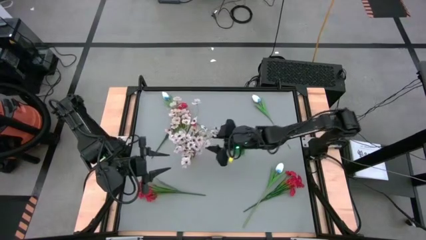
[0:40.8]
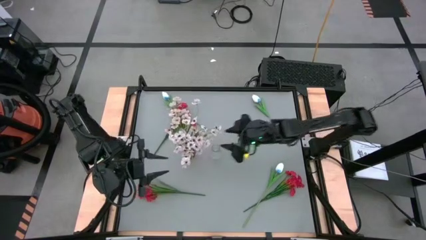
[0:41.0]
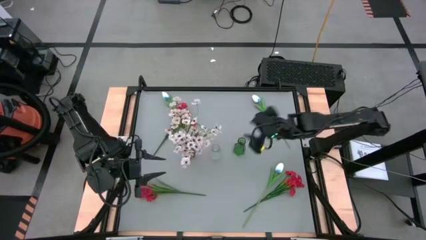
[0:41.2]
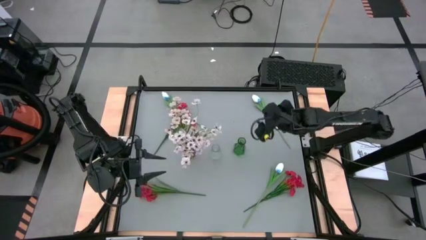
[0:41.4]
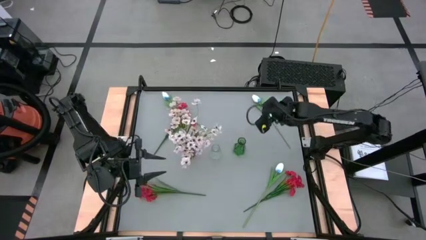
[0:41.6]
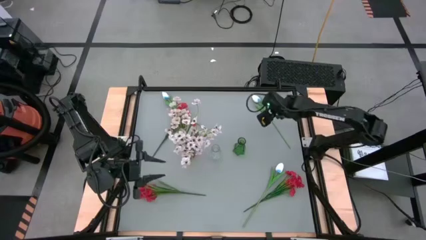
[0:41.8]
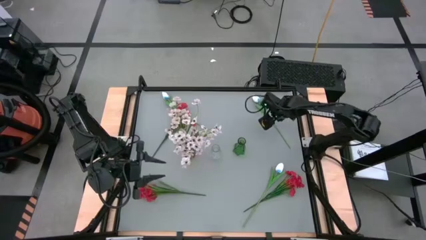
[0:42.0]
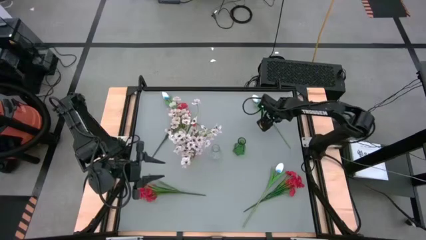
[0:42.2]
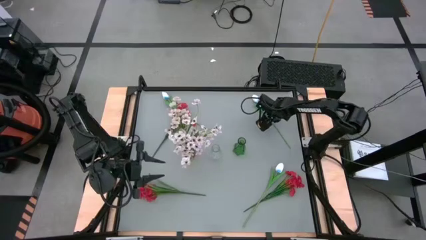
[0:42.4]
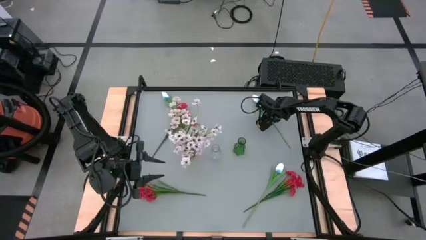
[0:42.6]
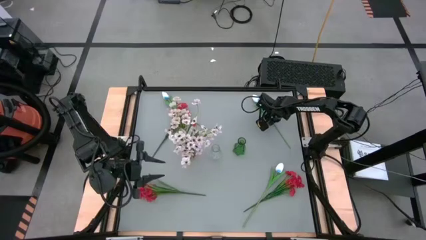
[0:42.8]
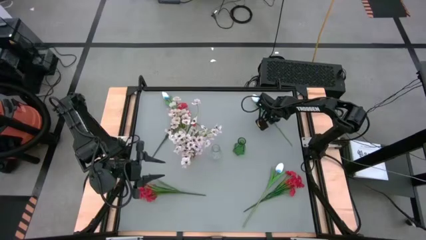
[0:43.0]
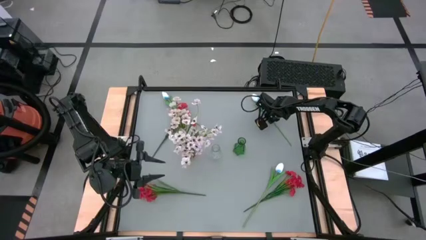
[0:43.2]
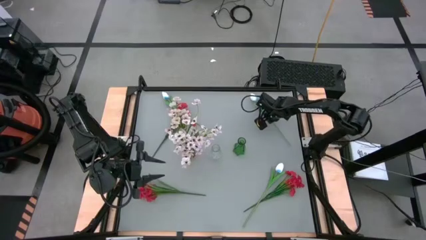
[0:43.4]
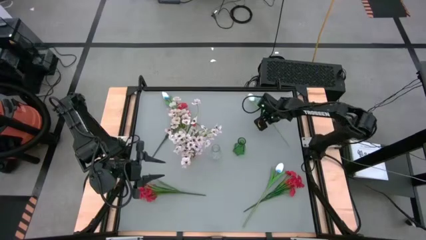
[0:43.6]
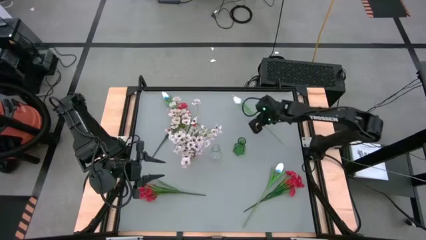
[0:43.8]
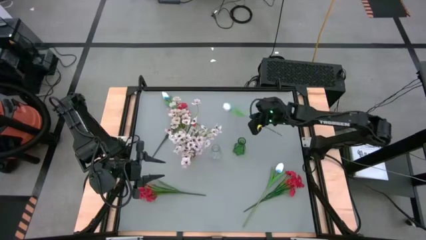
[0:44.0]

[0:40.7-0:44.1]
Task: Sort flowers into vase by color
Put the top right white tulip into the transparent flower vase

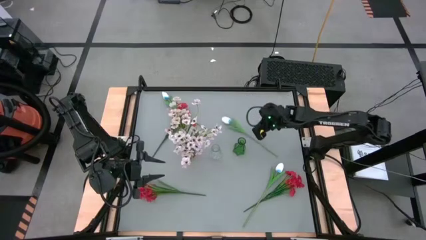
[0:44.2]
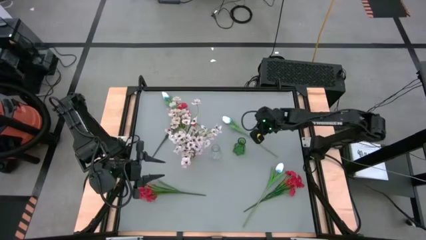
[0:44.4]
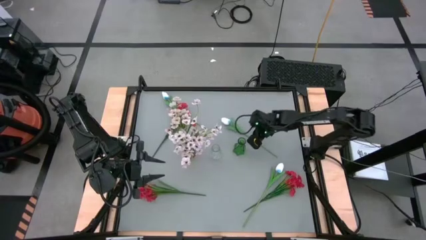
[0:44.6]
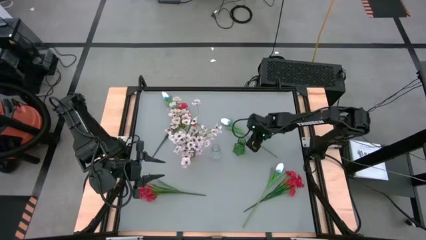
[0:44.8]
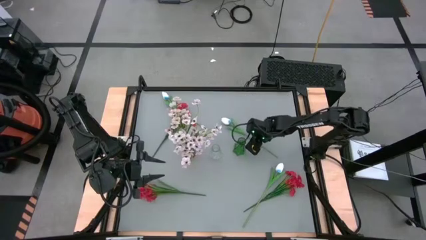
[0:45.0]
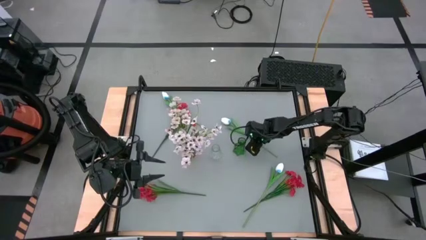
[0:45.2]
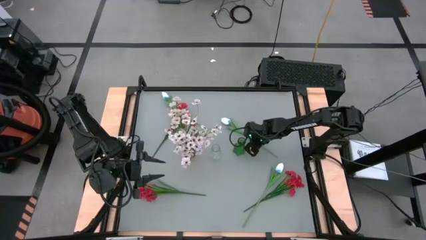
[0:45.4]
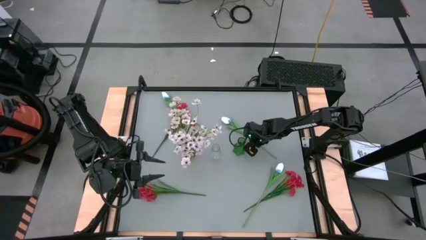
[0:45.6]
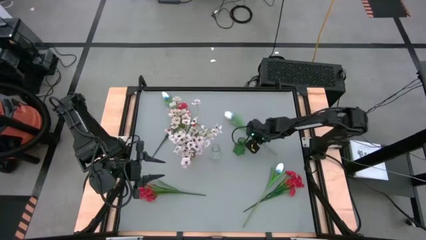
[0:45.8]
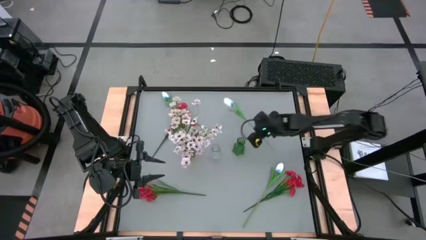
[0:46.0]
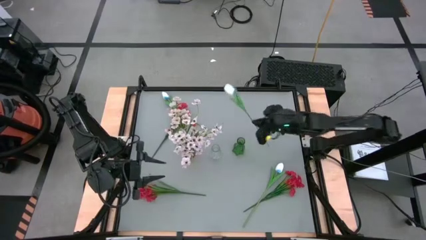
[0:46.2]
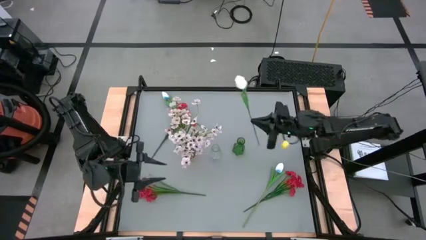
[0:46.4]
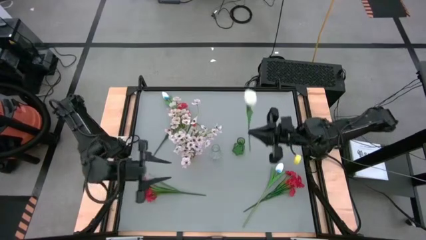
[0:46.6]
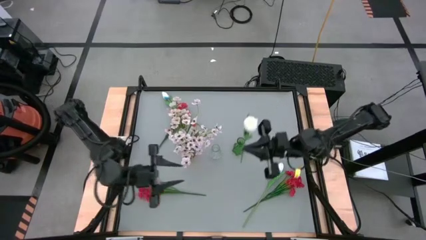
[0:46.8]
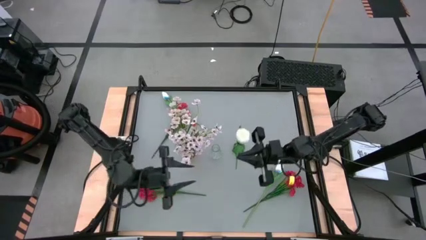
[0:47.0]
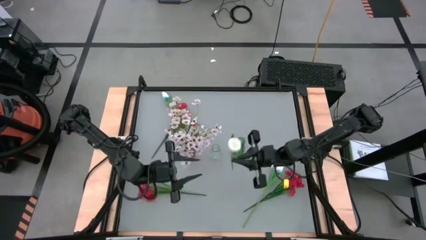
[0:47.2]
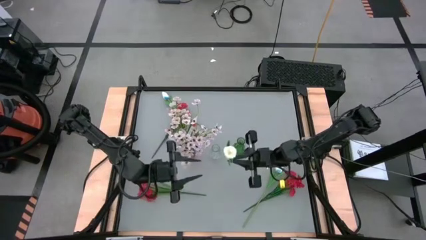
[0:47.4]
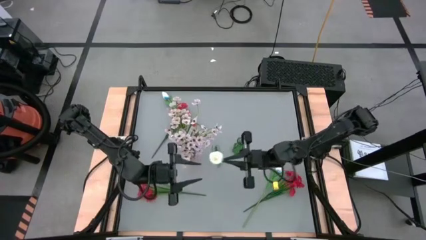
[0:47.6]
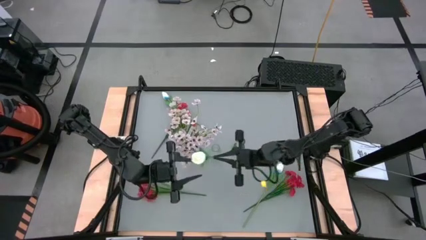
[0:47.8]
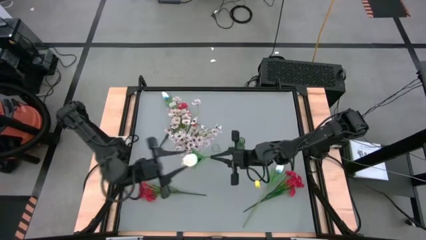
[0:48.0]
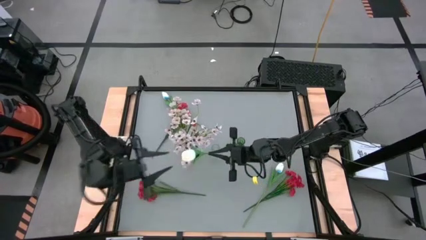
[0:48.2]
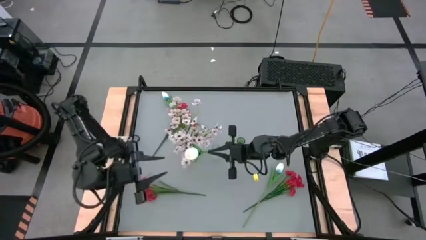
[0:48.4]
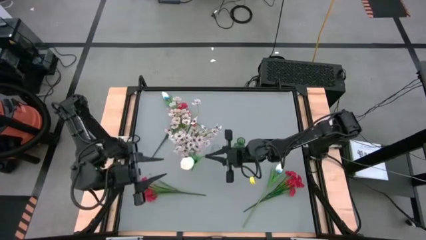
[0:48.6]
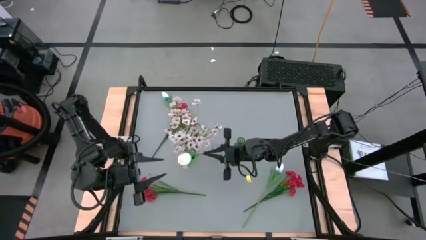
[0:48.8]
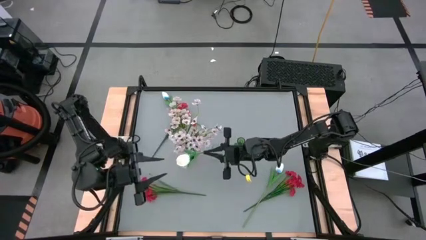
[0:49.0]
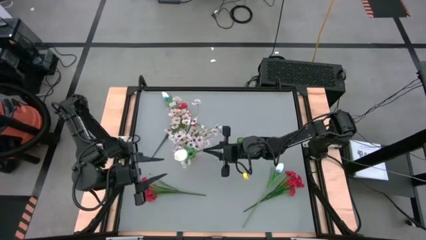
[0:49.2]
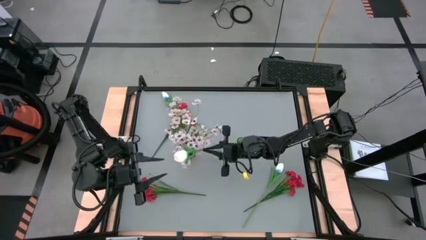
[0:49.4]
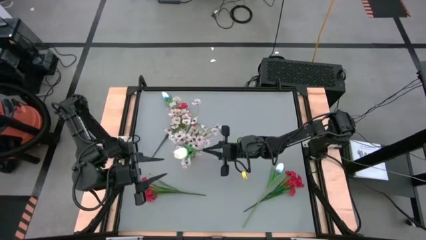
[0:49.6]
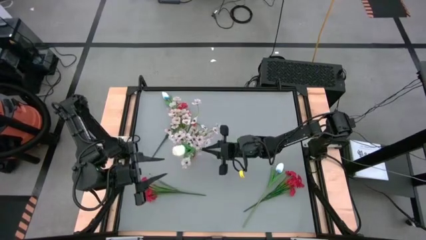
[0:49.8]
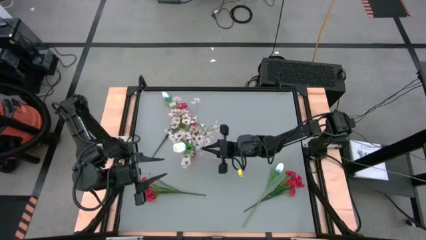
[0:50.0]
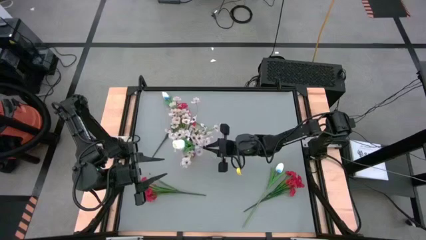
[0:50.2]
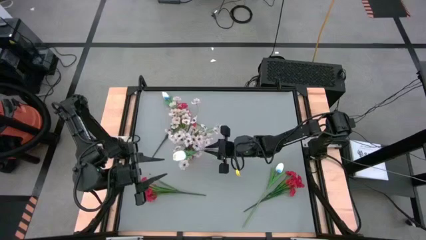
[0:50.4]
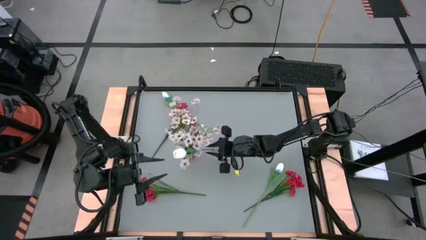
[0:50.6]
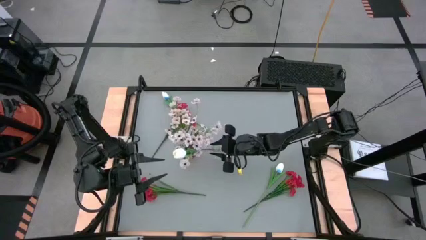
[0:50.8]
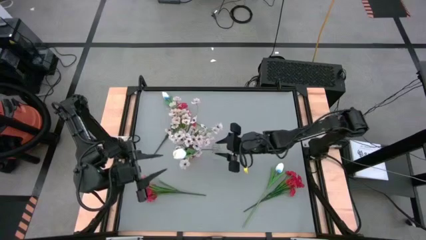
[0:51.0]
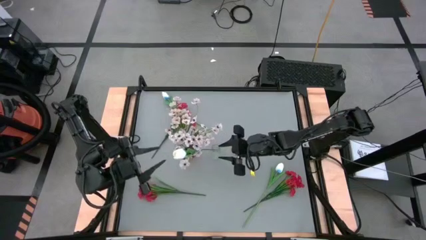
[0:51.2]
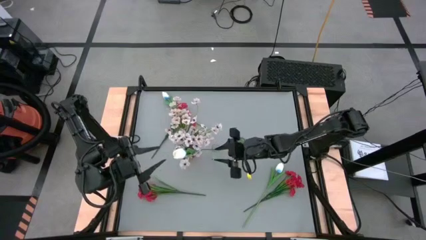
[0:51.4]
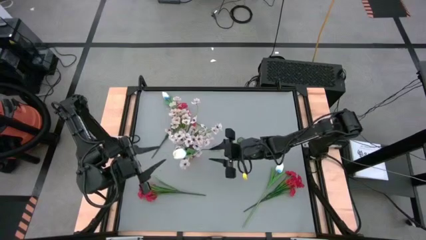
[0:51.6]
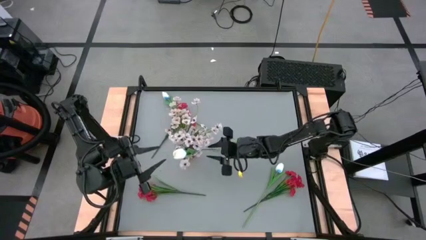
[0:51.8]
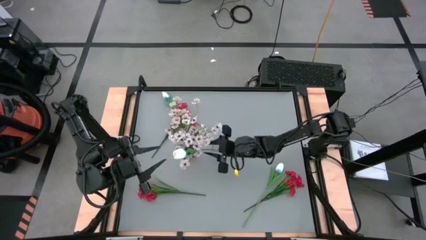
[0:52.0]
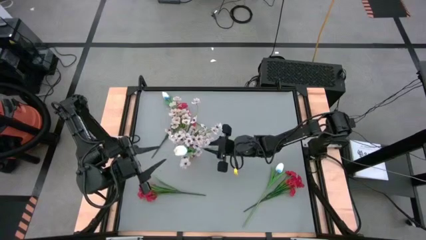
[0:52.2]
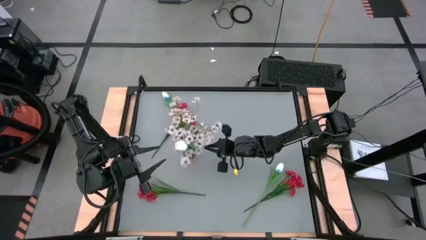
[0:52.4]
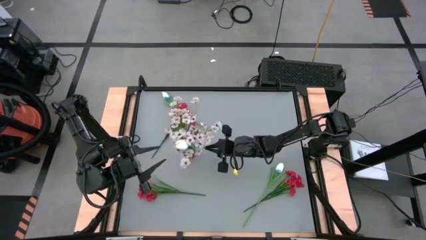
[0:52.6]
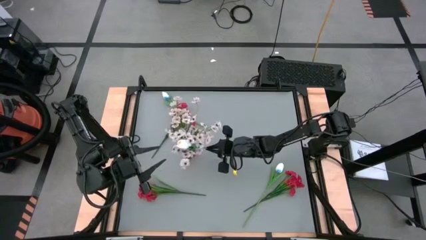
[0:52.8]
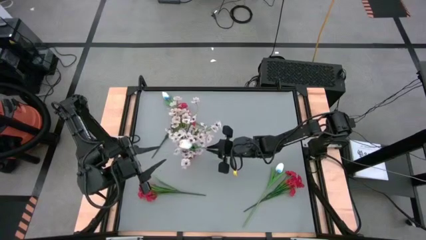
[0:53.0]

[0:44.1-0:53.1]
Put the middle white tulip into the transparent flower vase

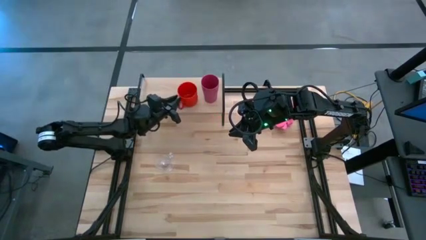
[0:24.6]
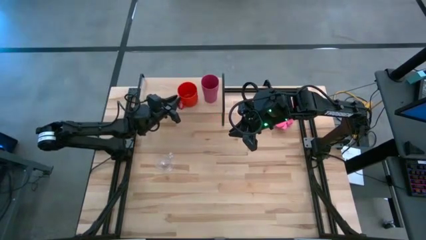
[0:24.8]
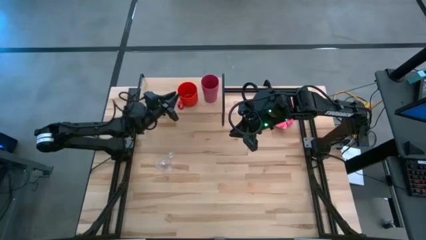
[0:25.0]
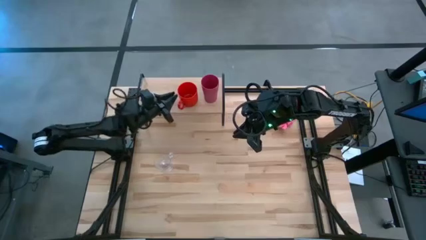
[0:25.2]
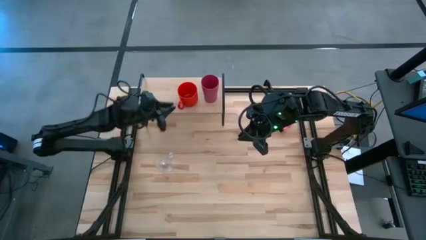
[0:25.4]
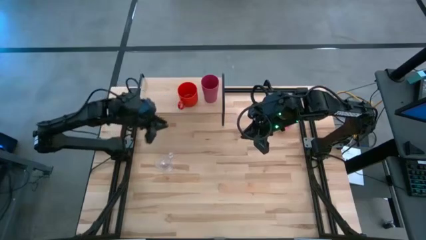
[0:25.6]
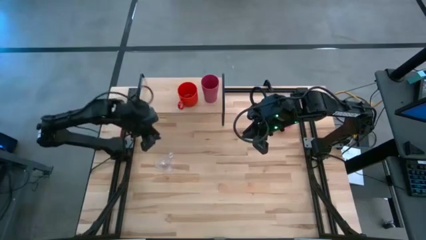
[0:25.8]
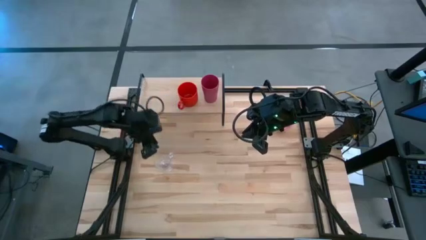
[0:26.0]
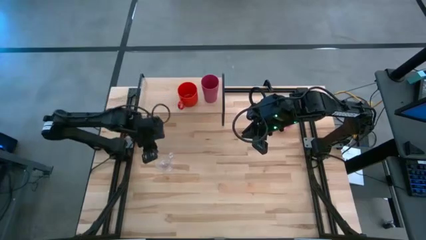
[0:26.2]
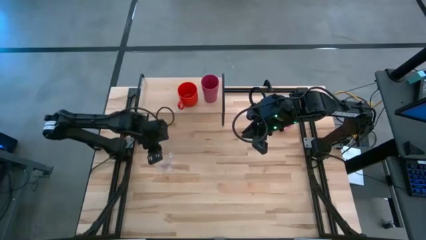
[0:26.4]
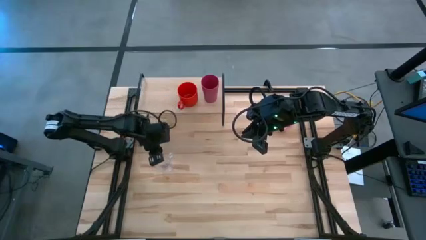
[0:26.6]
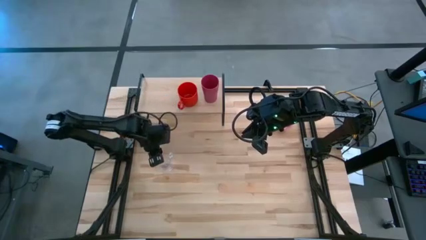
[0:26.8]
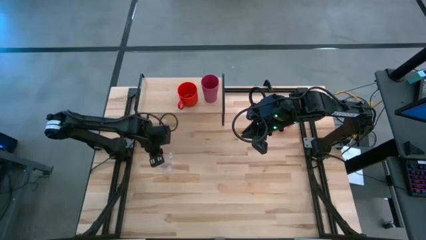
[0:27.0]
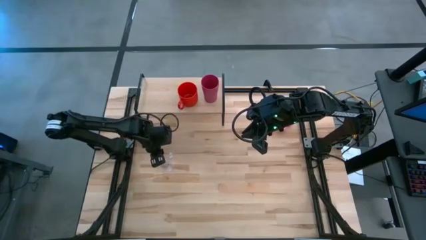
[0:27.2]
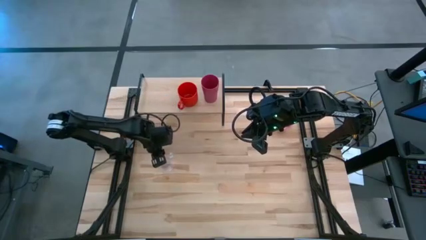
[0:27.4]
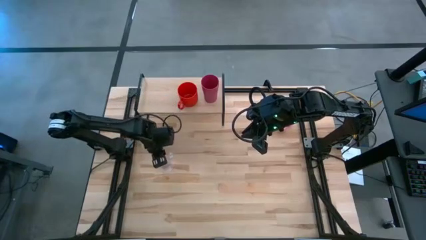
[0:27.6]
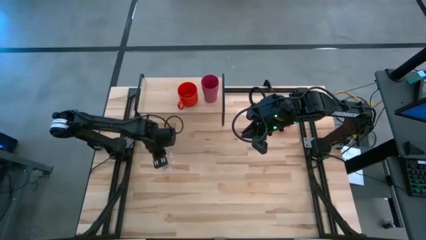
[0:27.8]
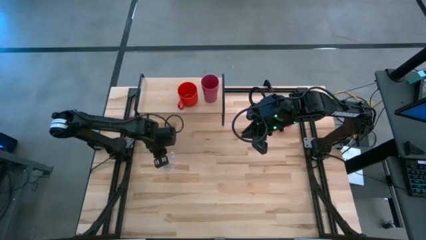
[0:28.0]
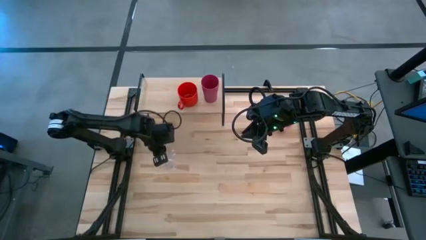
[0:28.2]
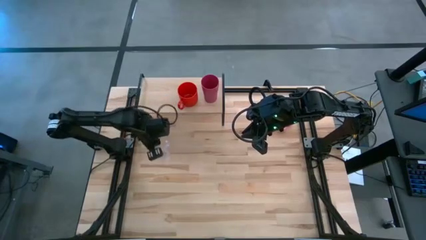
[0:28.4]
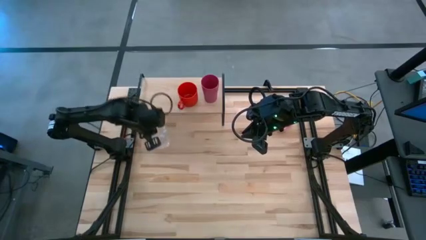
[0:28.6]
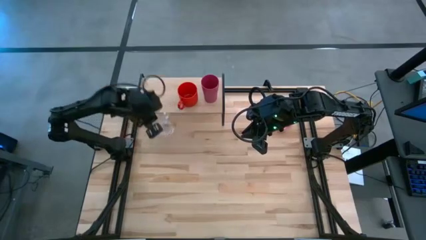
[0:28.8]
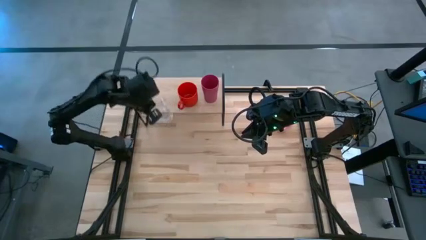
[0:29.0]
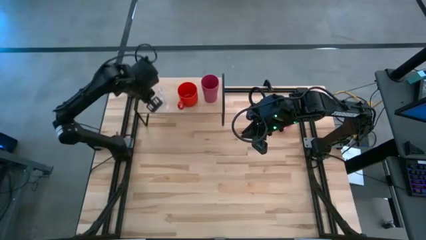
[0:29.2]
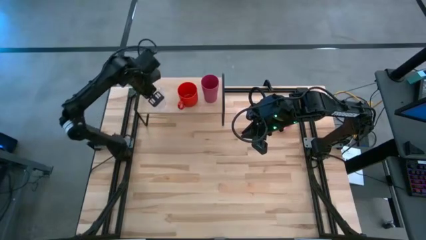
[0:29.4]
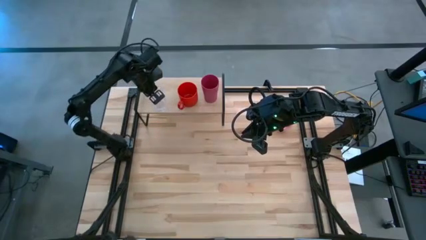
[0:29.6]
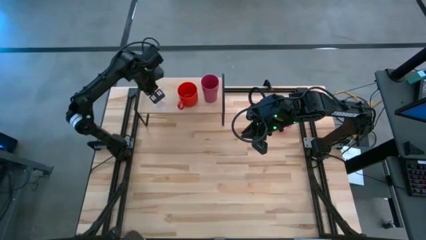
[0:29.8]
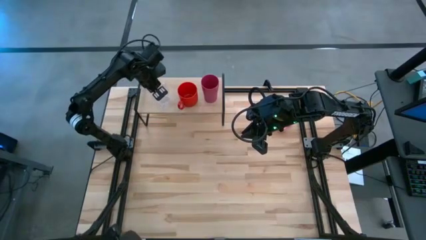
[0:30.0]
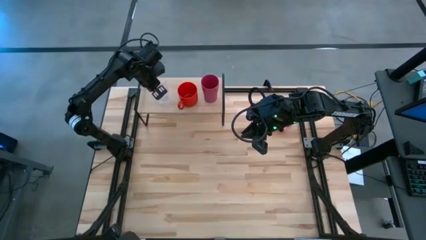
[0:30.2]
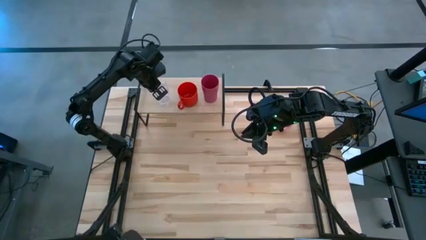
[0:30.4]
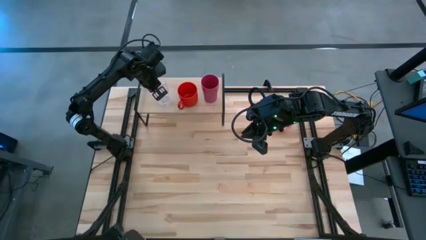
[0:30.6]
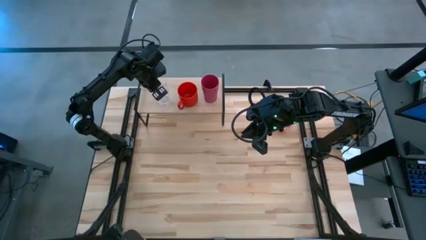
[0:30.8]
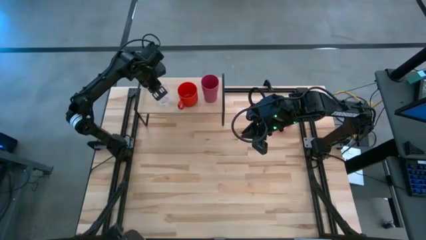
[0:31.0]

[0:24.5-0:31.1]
Task: Stack small to large cups/mugs on shelf
Put the transparent mug on the shelf
